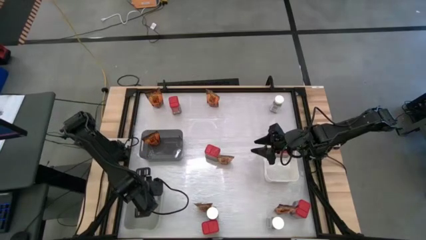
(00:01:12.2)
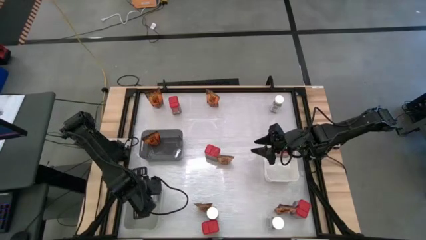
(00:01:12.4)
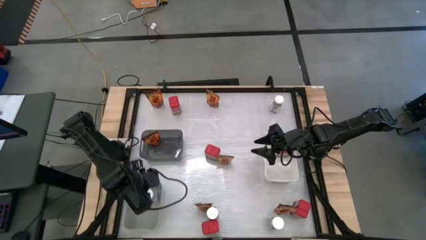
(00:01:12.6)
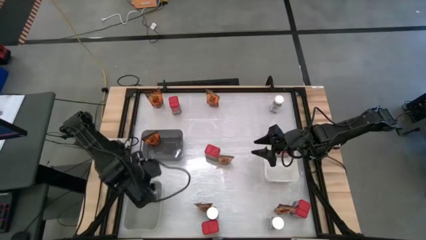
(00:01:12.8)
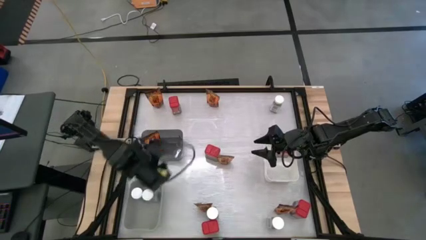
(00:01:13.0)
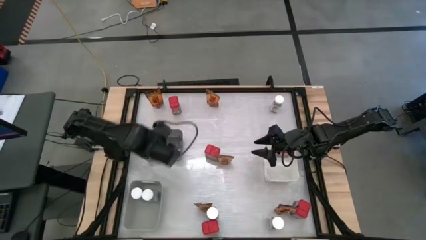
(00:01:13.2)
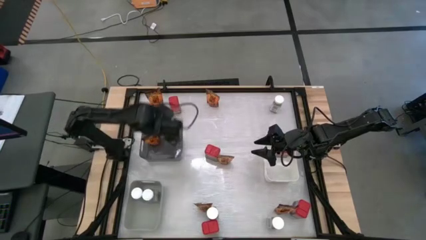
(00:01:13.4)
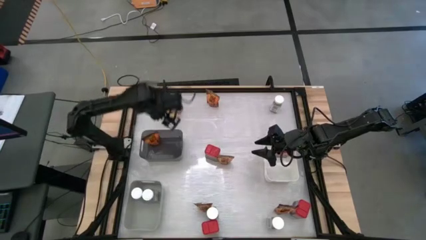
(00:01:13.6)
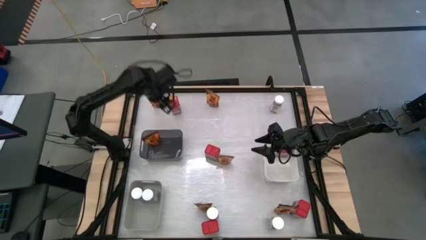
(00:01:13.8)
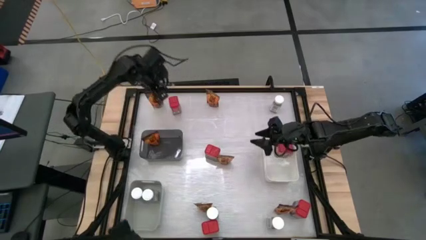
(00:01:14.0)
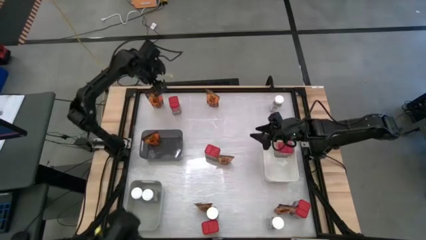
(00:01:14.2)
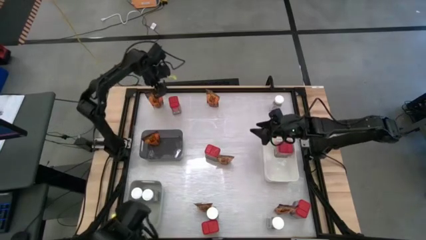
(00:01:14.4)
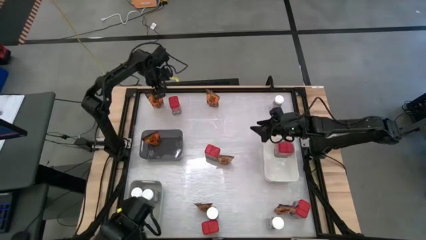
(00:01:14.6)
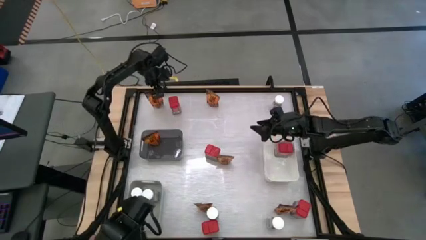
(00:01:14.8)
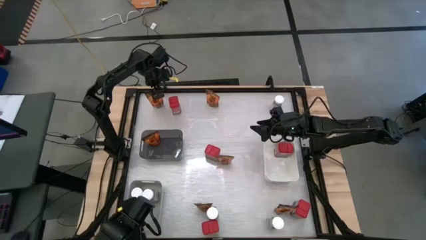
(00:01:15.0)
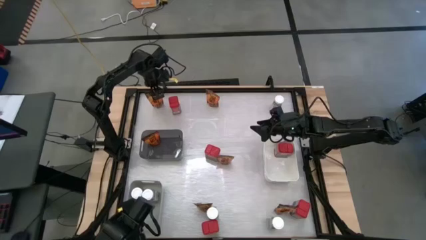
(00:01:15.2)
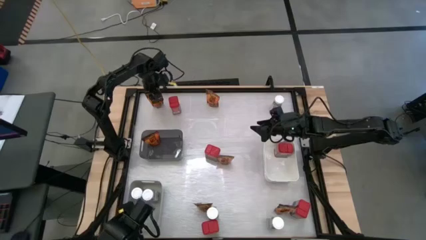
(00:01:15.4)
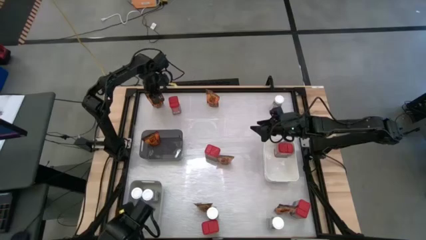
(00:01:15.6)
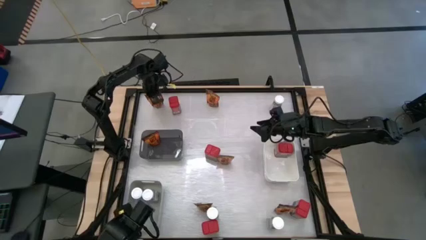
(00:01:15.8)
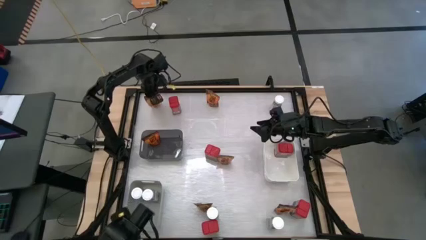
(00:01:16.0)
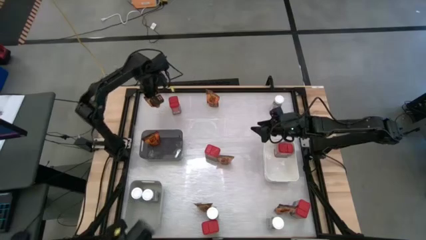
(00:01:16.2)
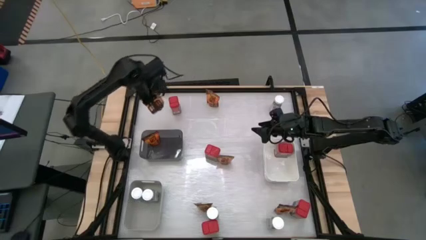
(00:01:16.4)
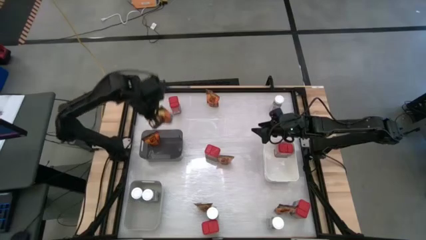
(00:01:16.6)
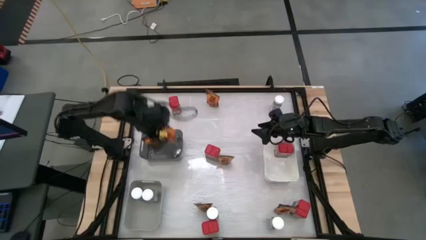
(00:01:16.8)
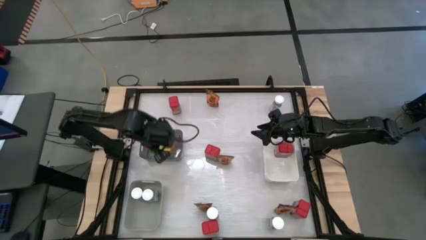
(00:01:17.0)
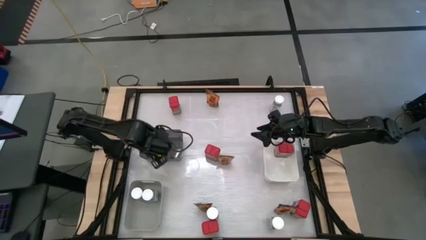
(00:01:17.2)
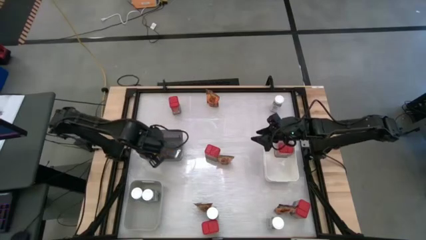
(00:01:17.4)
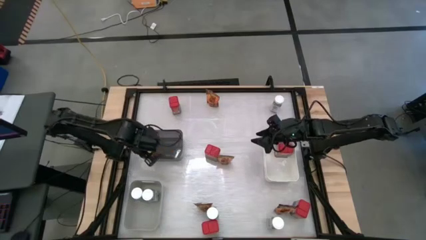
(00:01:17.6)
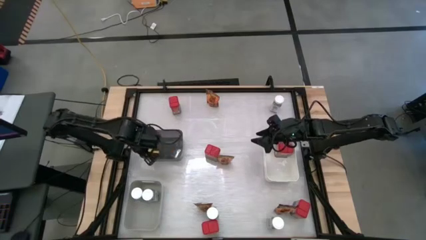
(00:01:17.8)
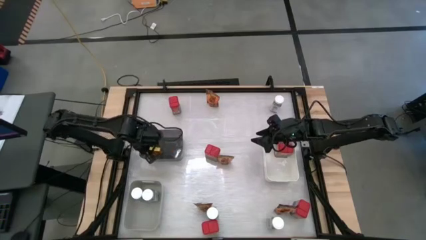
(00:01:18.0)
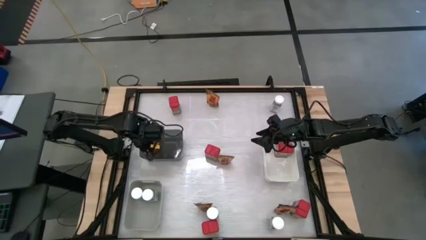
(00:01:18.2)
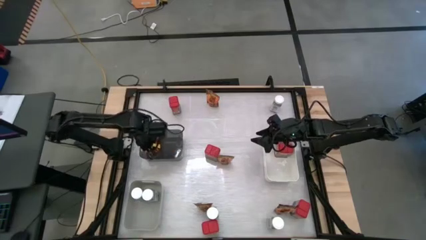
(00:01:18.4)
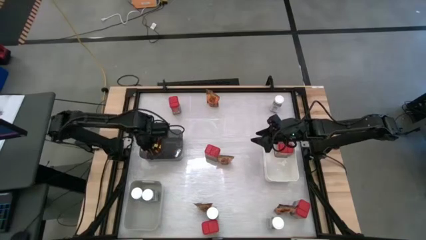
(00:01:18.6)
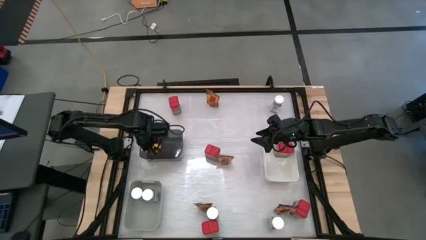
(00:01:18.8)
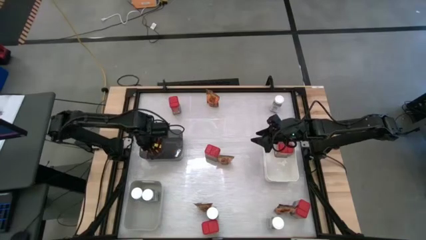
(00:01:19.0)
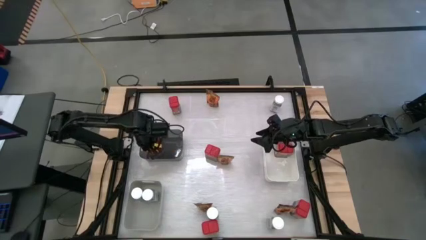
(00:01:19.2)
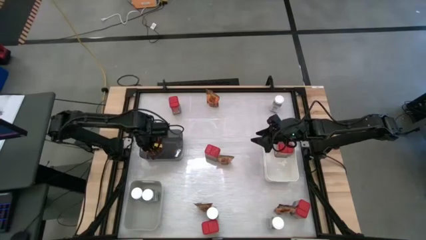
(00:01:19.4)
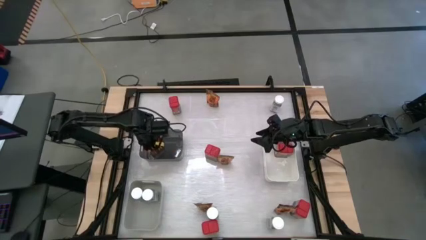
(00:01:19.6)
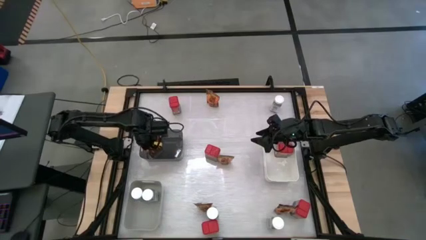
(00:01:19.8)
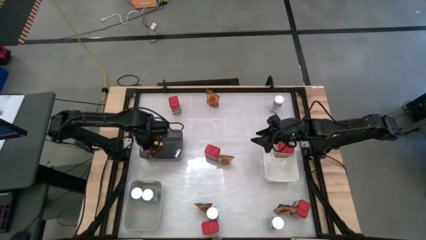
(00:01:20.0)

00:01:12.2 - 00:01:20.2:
Task: Sort spices by type
Put the orange spice pack into the black bin

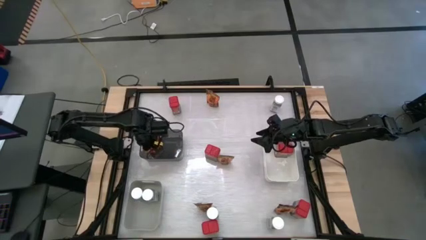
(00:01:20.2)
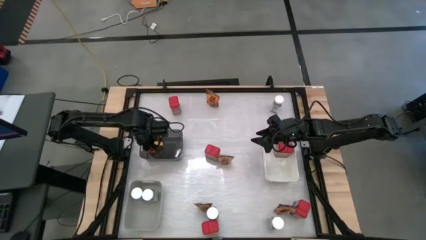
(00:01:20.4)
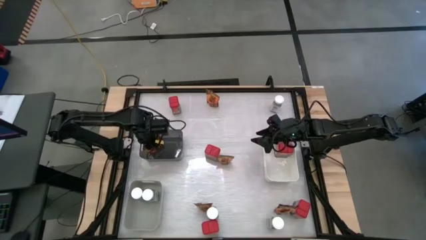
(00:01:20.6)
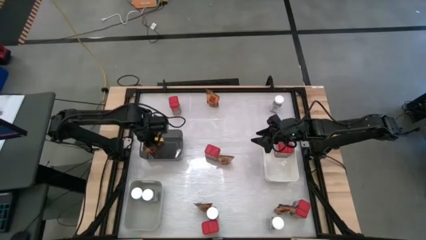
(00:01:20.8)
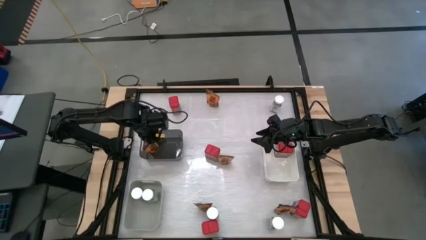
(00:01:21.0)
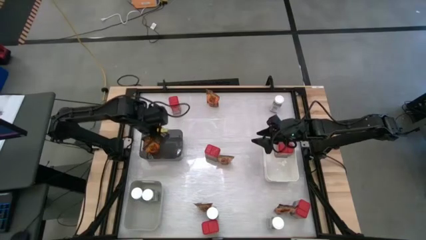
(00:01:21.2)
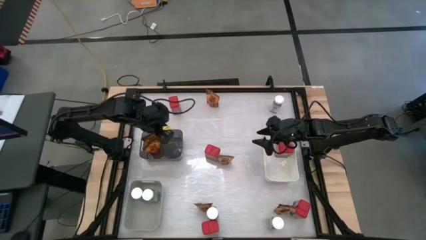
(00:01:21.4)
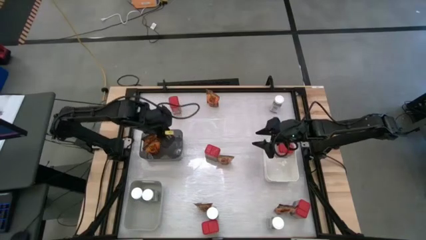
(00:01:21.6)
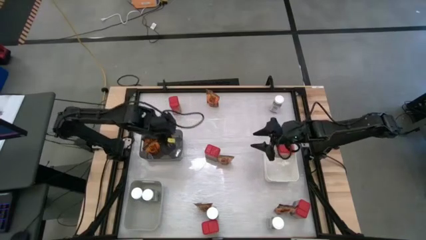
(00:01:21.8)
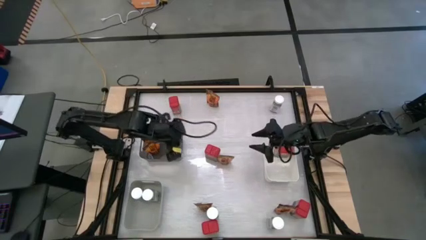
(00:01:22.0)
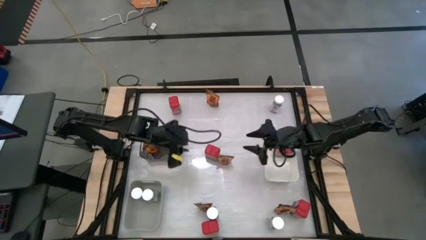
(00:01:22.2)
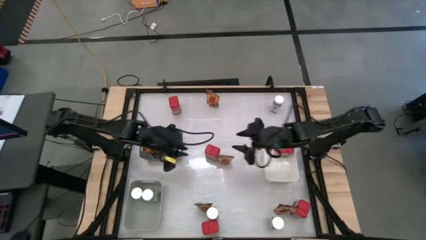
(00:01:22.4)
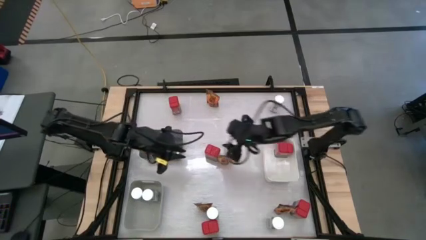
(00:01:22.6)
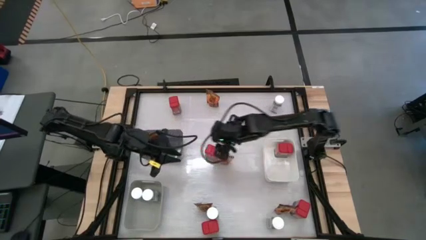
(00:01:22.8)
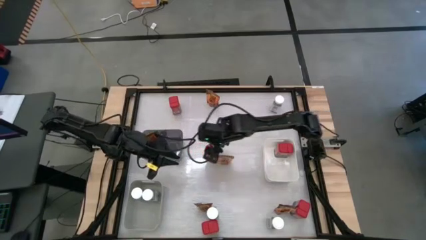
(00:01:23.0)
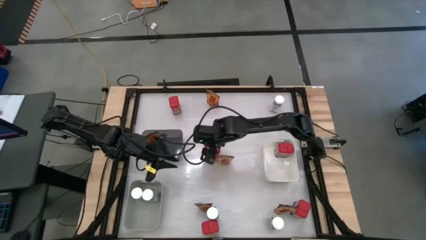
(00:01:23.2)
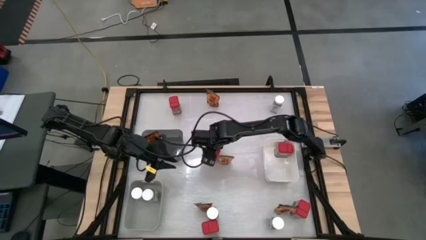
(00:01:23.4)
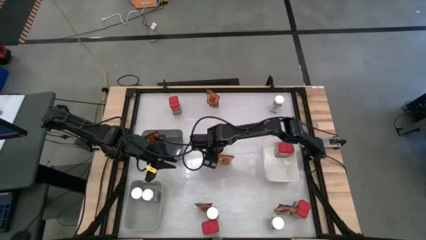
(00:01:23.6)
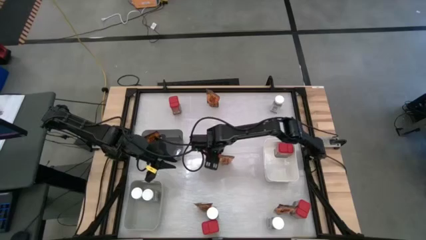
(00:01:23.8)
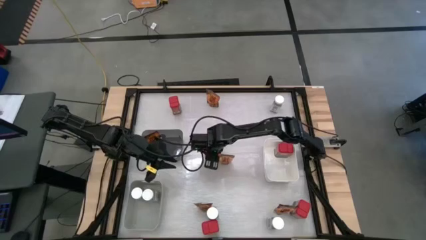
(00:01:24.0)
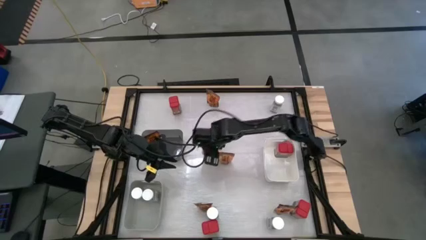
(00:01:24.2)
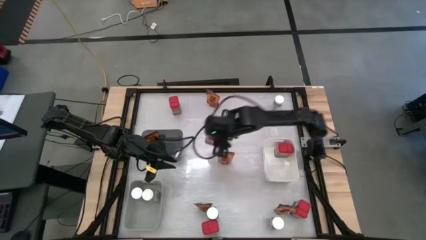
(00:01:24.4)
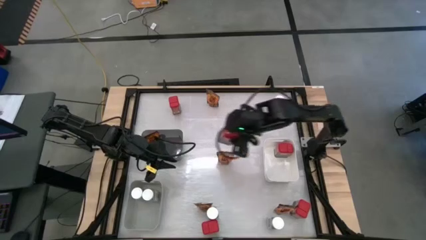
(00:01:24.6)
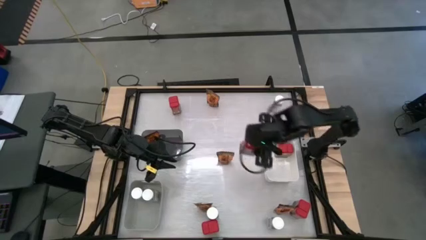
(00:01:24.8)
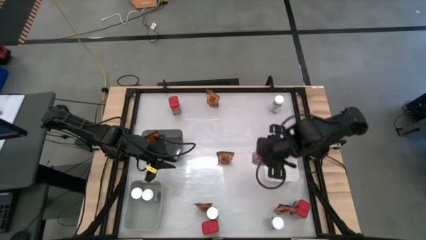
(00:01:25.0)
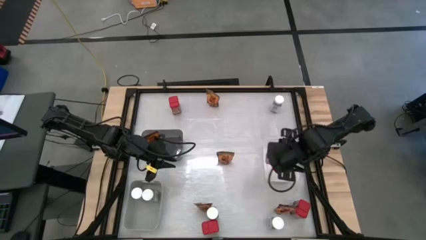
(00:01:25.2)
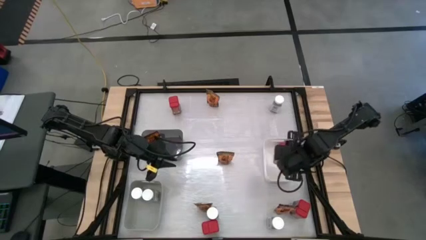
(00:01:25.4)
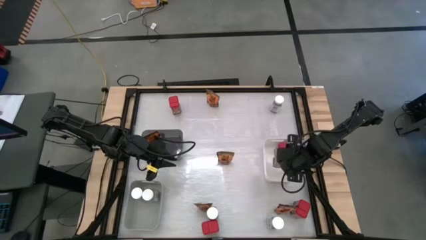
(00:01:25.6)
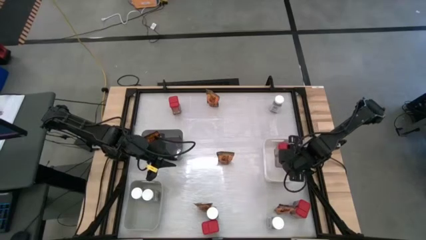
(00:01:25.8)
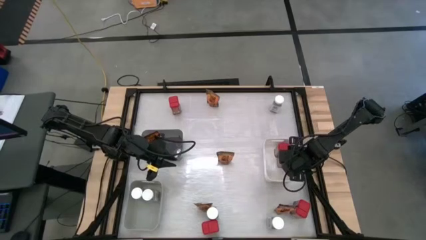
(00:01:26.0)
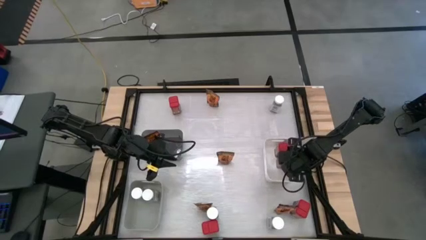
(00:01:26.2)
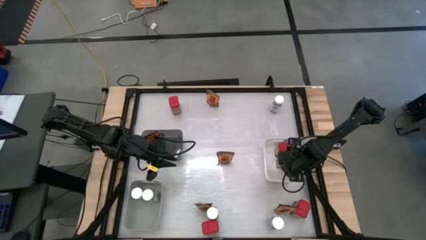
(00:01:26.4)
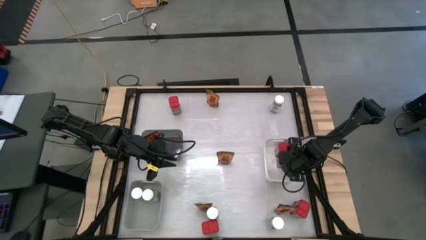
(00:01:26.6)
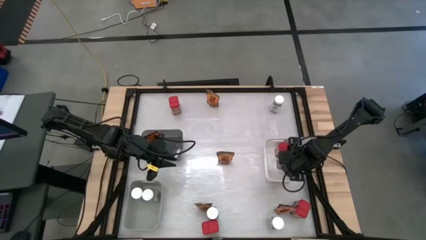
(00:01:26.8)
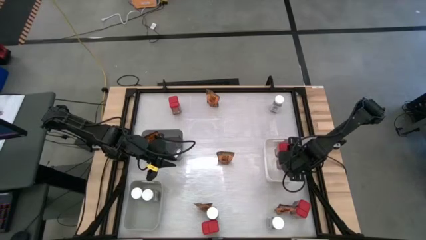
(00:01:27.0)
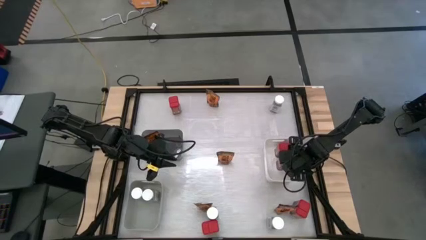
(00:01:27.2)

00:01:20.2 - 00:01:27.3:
Put the red spice can into the white bin
